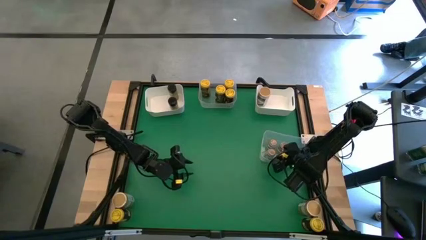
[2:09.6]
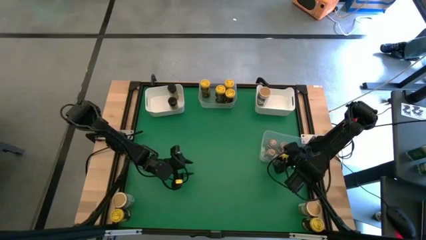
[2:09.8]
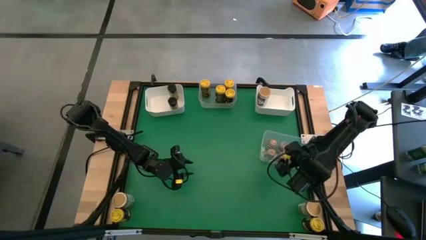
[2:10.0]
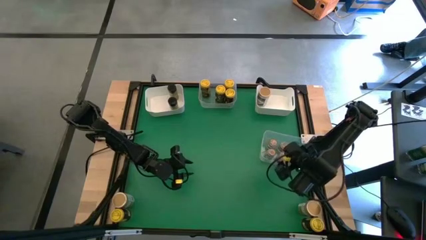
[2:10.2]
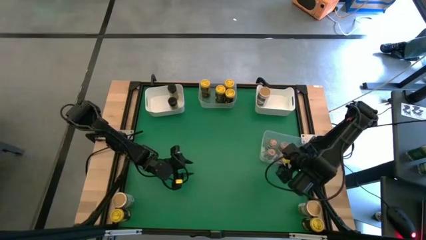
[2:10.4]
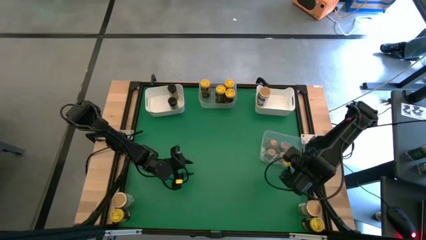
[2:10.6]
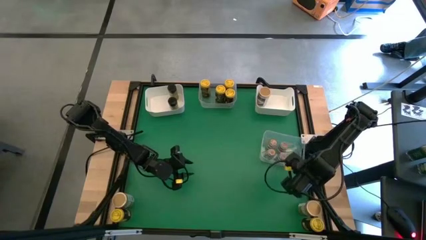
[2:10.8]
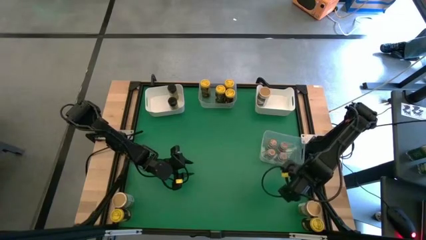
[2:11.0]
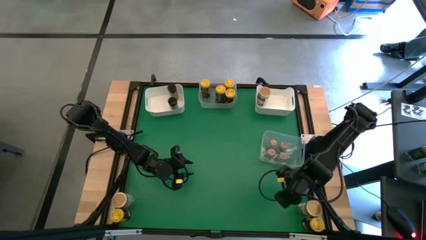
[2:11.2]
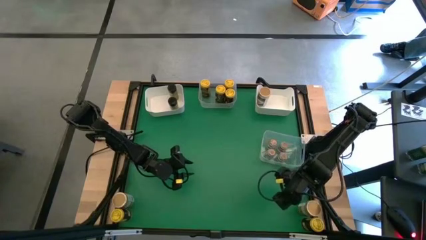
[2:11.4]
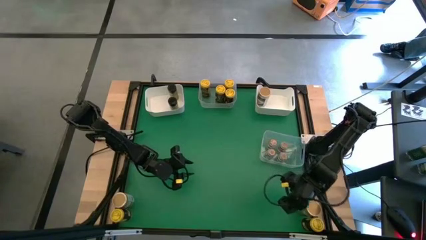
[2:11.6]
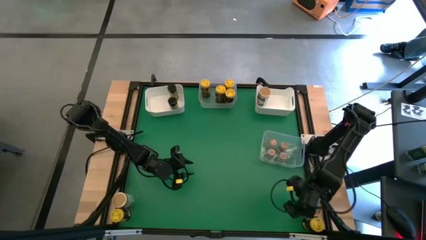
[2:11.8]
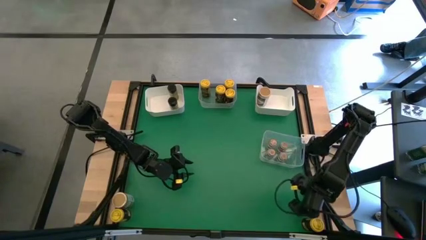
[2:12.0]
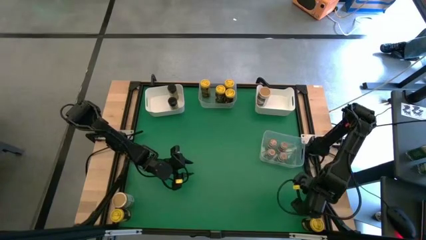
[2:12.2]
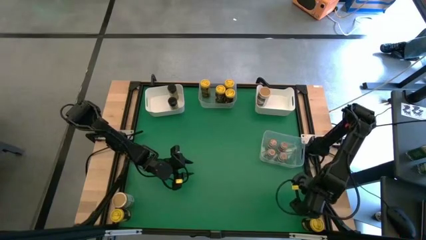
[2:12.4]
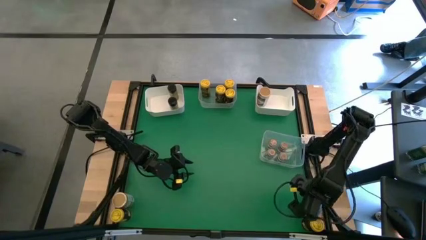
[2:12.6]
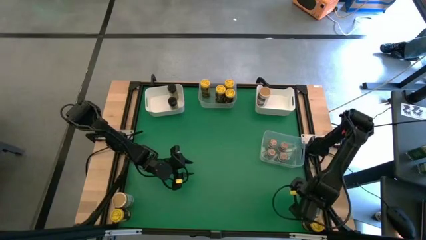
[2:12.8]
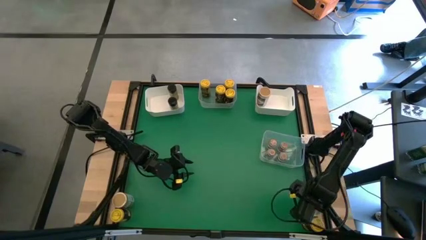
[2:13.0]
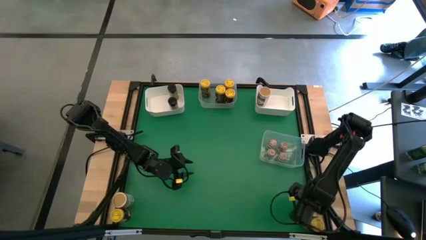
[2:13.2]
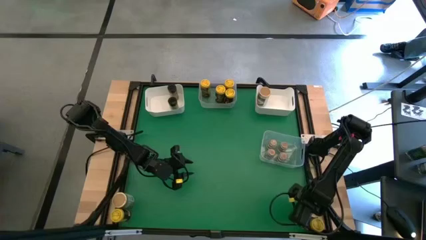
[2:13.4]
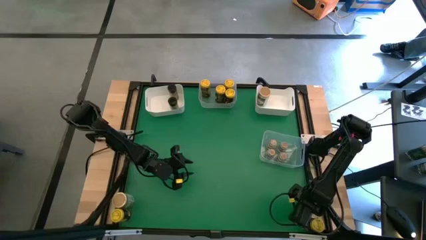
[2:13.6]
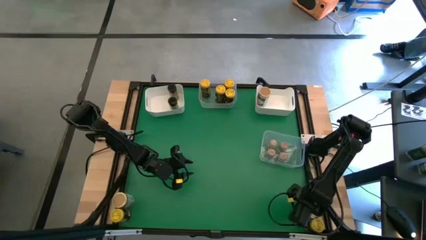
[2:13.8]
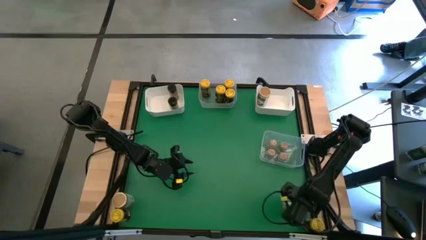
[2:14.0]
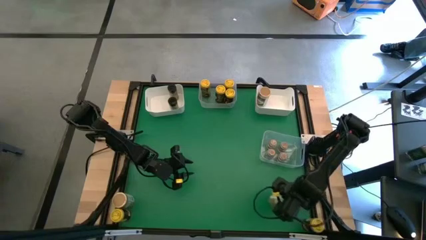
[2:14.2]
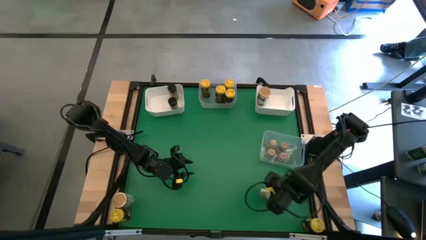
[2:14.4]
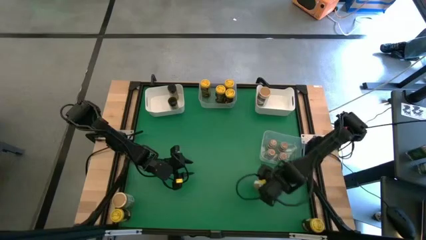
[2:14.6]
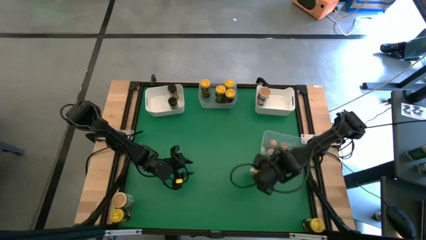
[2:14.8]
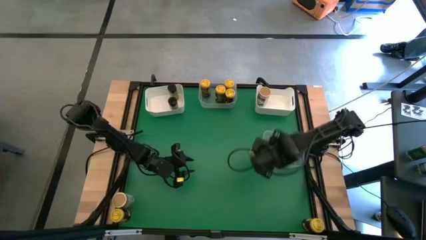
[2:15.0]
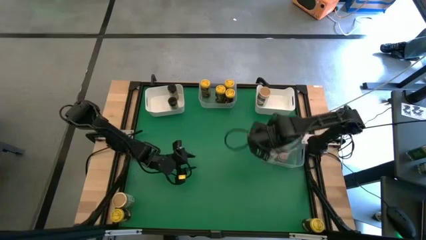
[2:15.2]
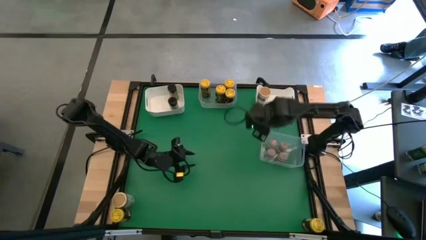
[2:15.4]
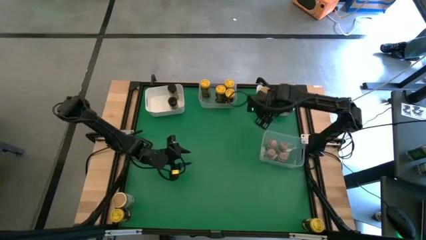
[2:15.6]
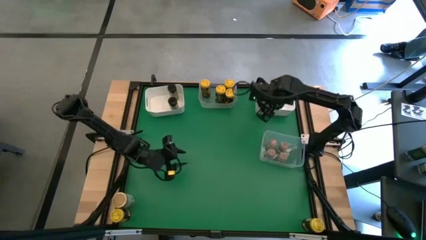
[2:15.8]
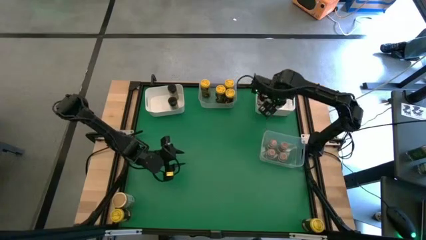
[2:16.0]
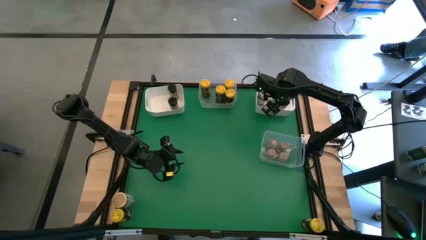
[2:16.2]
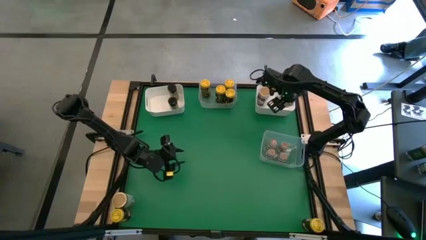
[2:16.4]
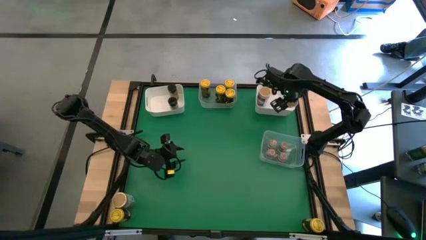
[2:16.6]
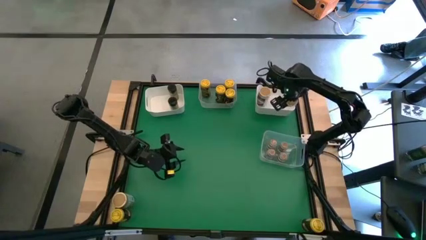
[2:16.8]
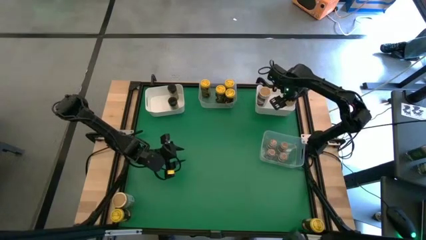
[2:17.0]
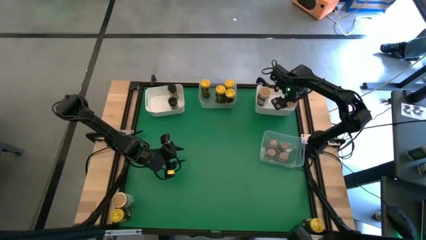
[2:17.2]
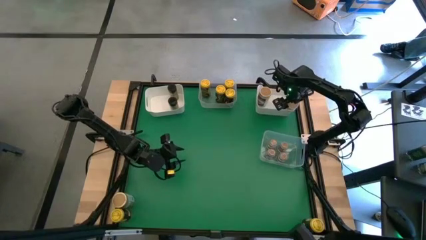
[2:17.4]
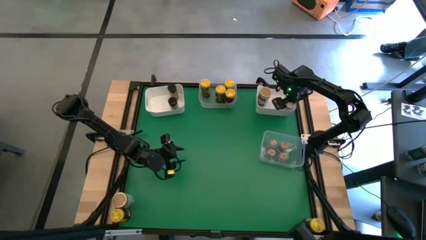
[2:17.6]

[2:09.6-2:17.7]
Task: Sort spices by type
Put the brown seasoning bottle into the right white bin
